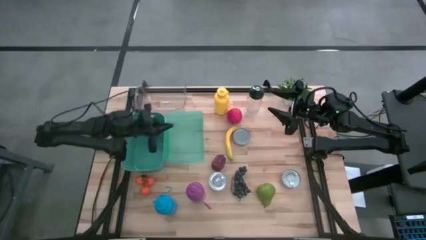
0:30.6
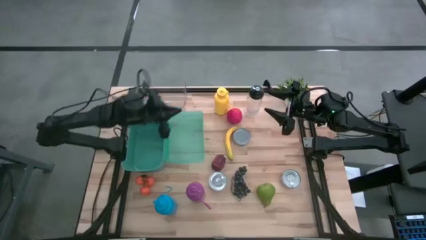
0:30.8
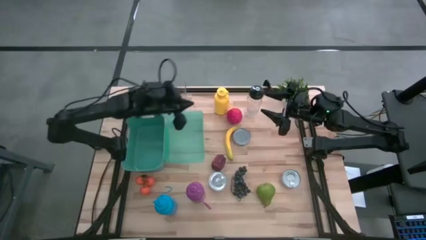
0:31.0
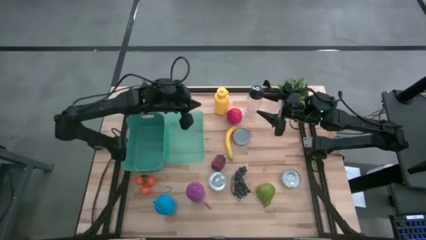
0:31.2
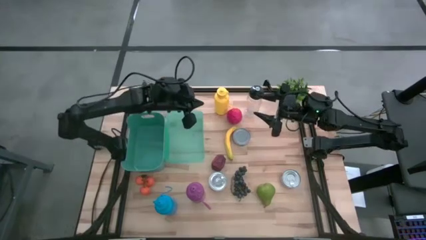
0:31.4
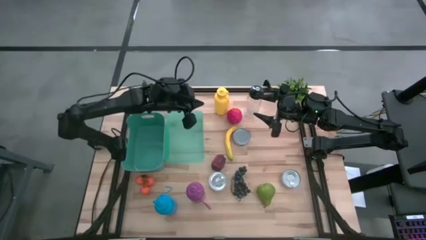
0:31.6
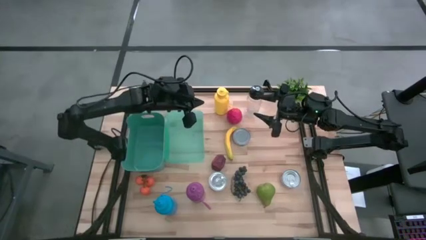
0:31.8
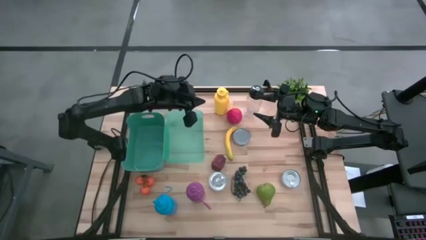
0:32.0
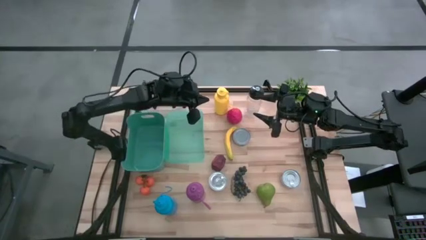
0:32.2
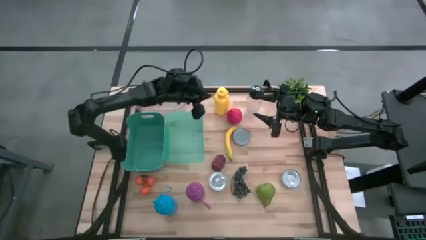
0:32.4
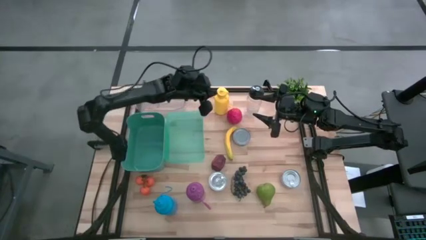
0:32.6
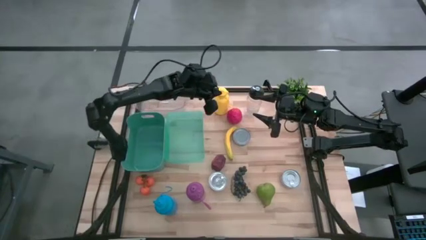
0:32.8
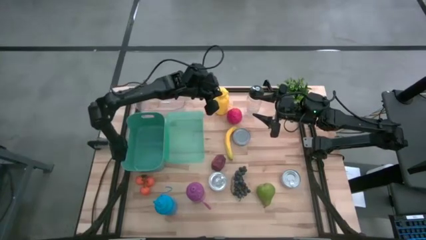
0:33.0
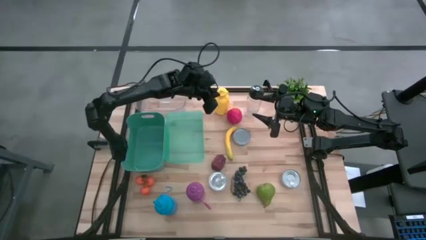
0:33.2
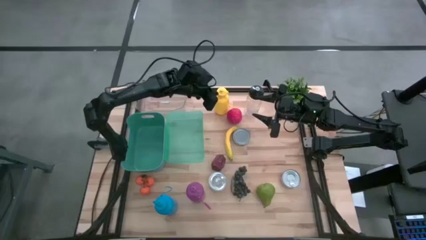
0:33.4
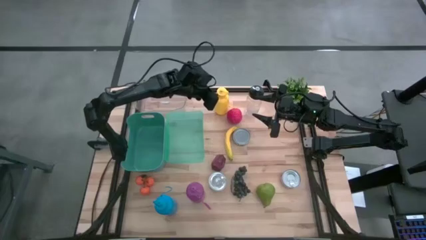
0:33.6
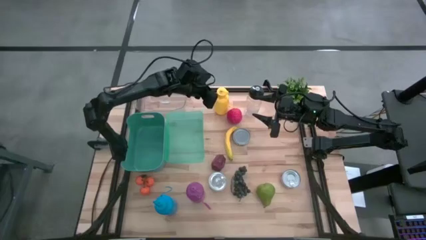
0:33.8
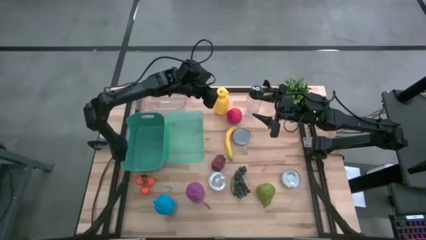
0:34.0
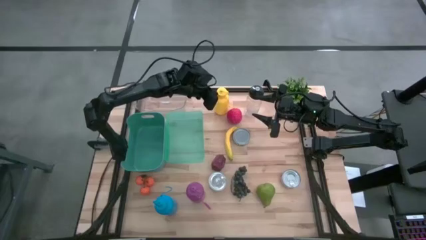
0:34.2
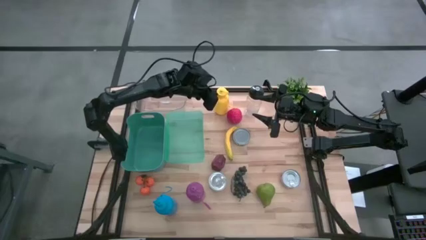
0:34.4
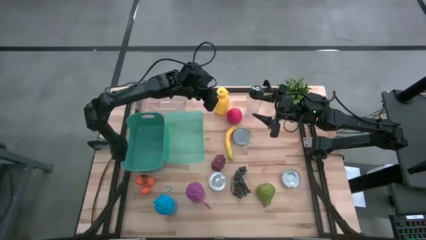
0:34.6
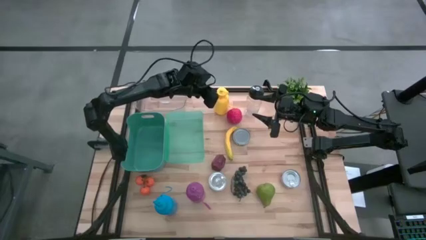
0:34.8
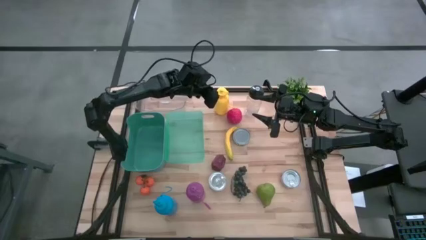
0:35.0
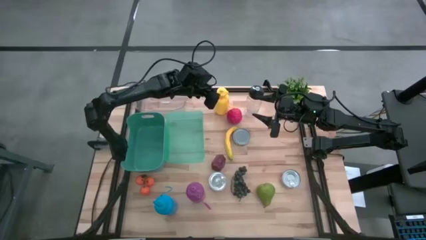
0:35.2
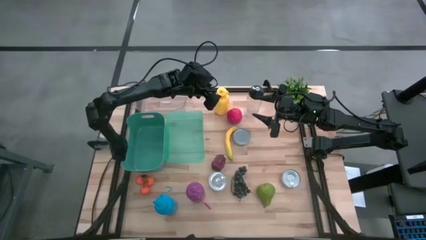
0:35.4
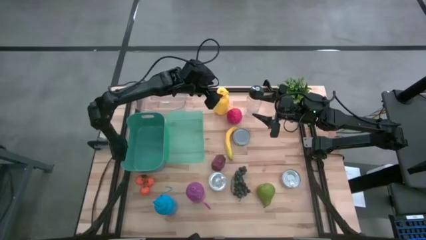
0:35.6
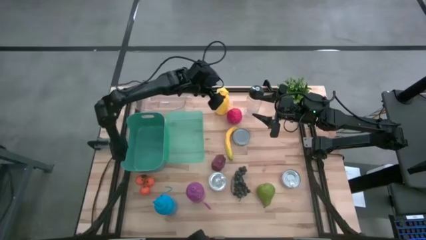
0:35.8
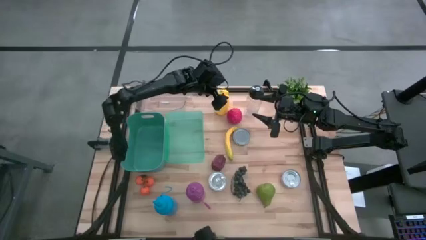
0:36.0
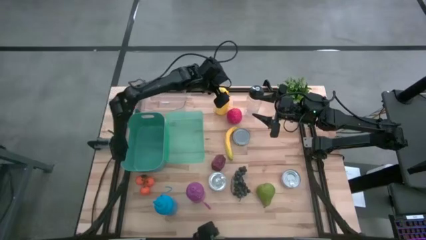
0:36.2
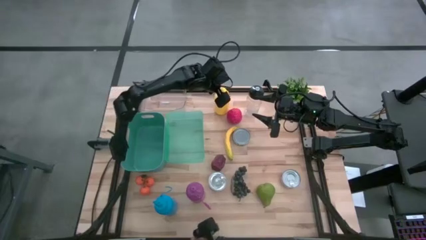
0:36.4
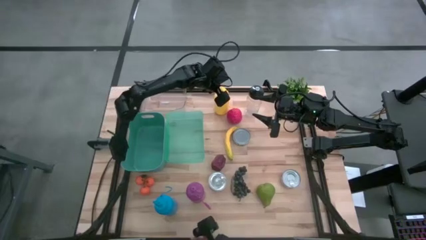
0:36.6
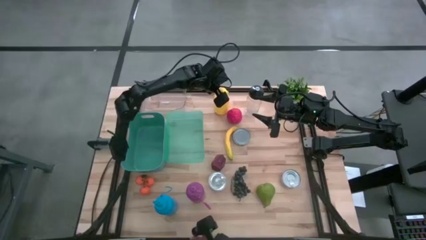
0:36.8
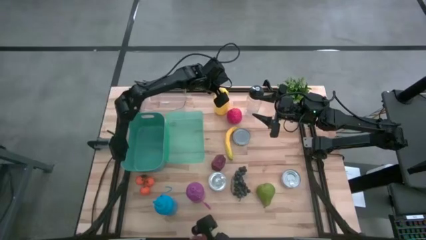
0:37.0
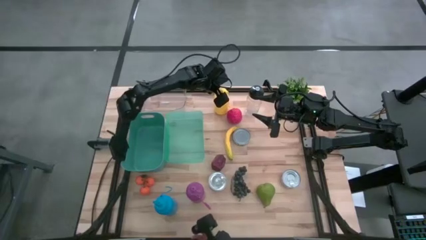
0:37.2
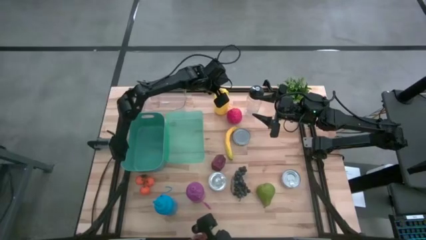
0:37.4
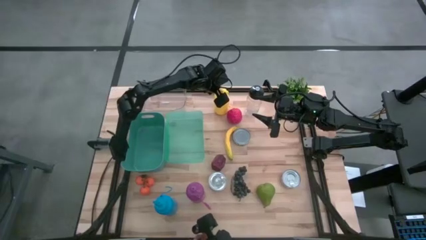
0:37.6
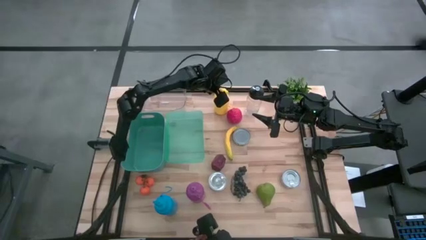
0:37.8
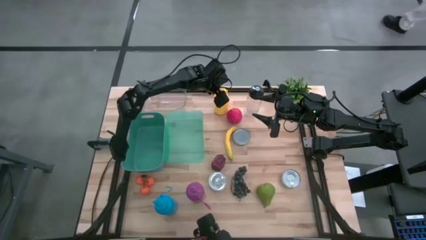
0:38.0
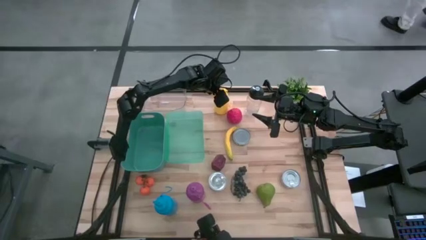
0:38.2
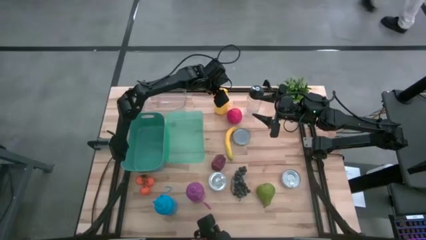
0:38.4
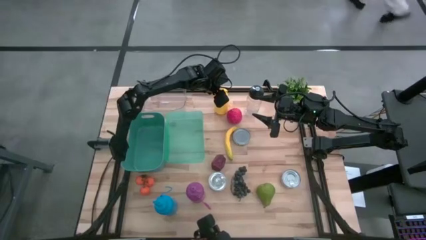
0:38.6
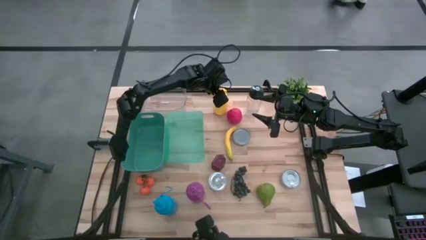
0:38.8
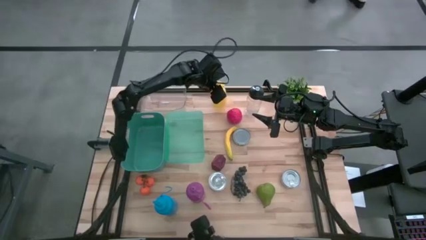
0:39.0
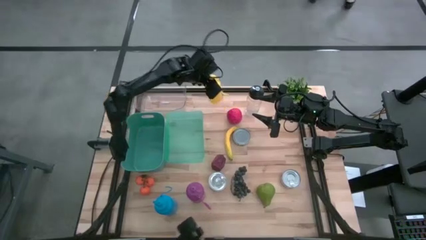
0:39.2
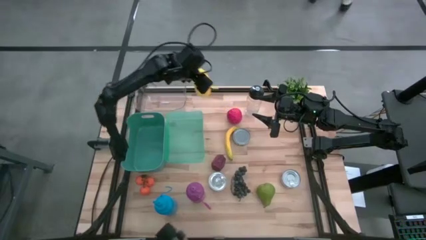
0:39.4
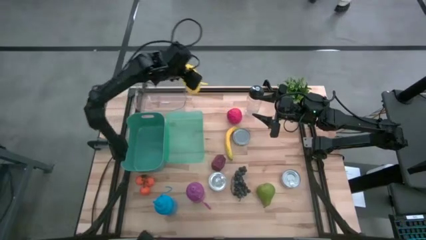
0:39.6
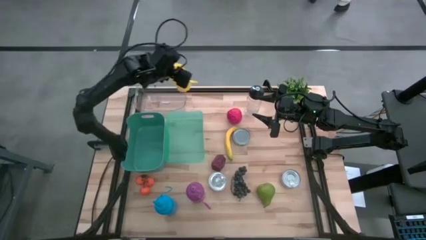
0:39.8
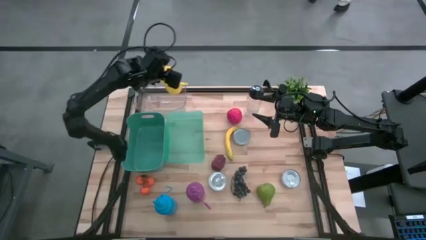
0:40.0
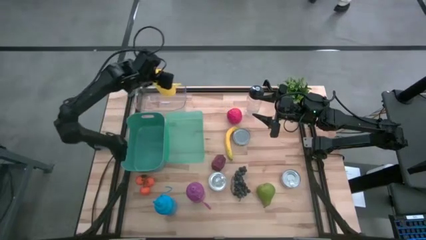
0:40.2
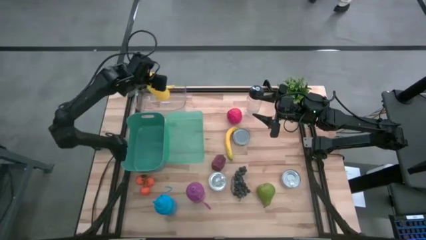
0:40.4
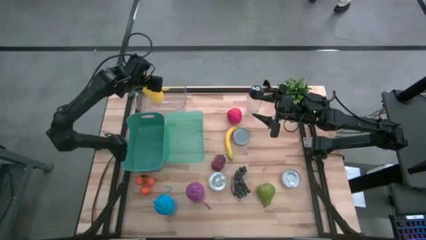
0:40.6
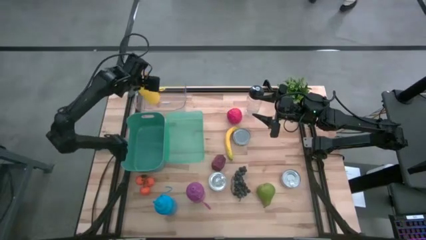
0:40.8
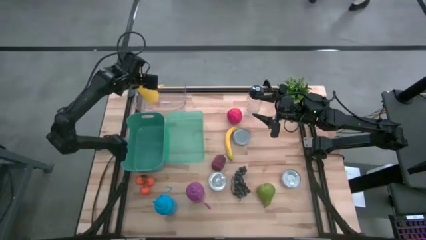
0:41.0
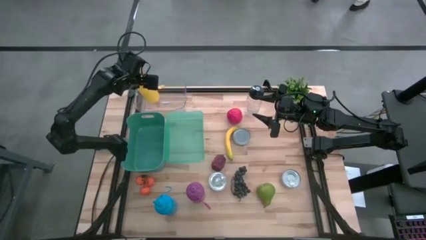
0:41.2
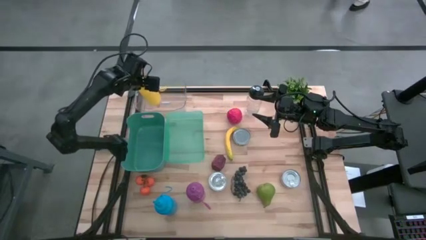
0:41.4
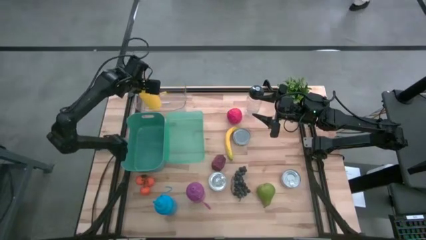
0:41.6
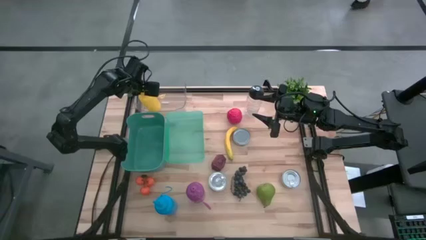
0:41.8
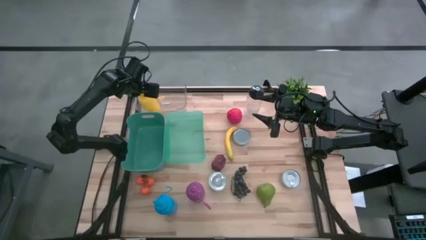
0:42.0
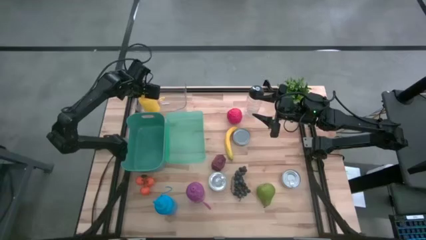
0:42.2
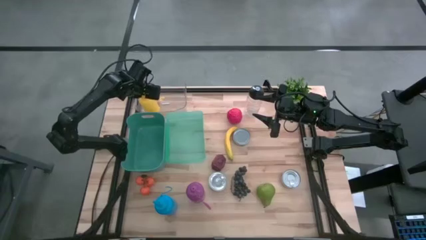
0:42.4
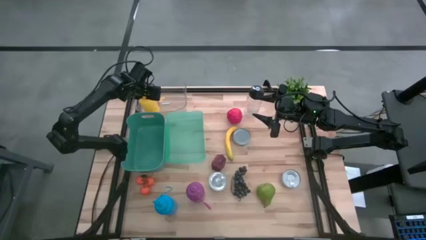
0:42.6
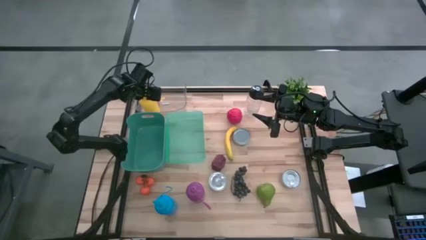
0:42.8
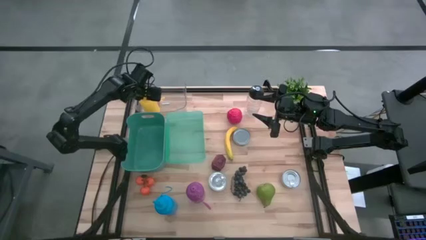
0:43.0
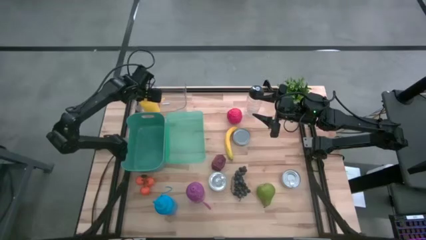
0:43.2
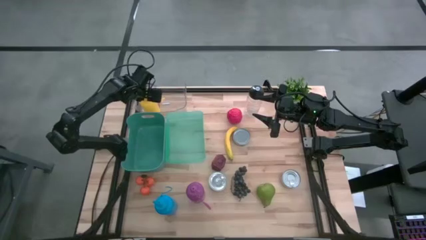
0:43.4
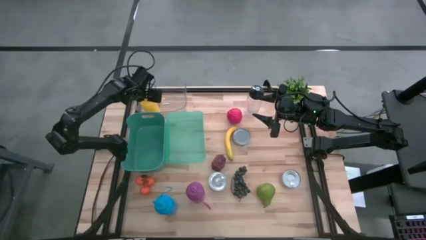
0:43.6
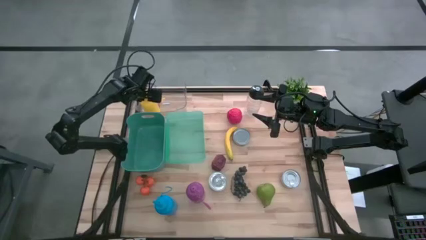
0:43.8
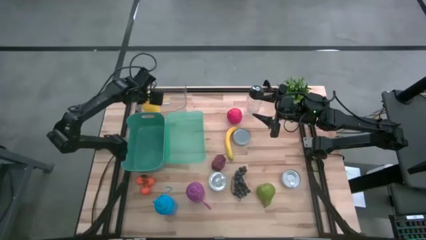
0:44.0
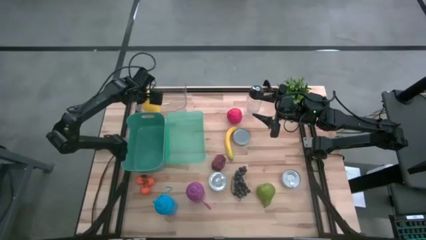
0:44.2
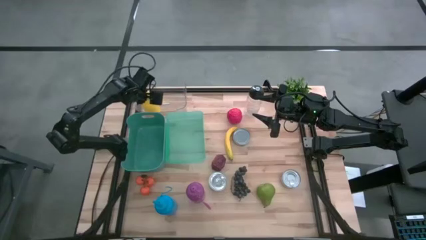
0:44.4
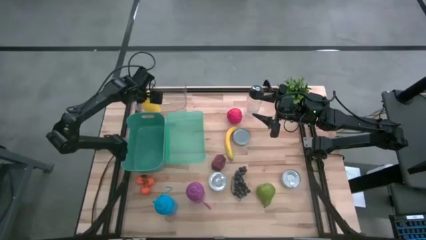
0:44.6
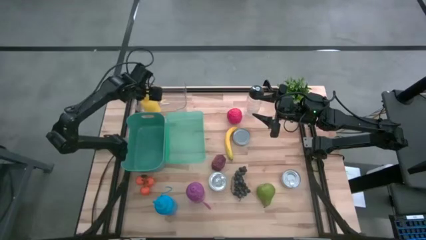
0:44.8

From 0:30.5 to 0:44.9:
Task: Pick & Place Food Item
Put the yellow water bottle into the transparent bin
